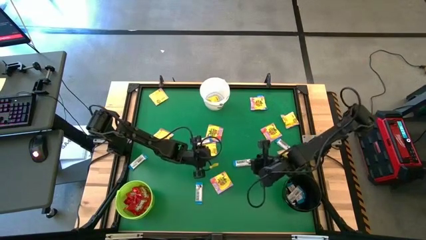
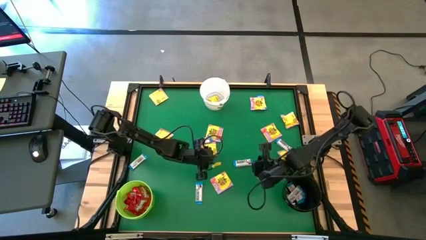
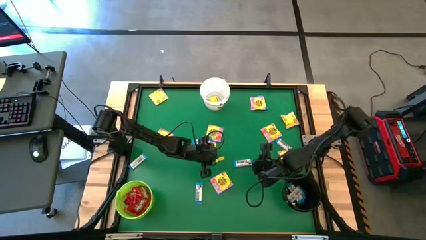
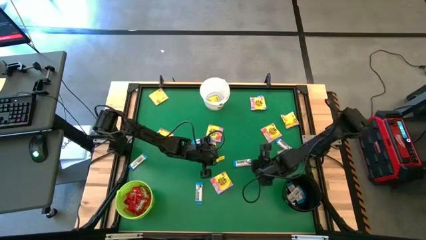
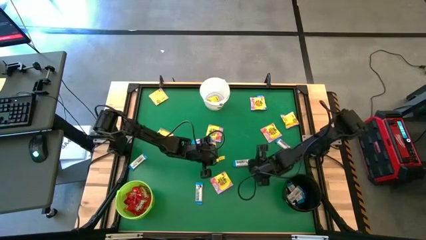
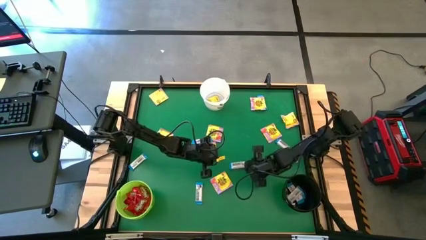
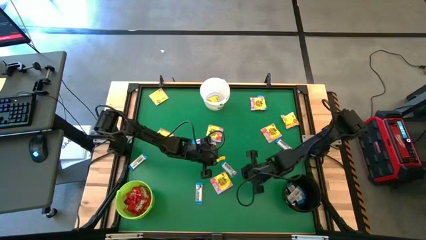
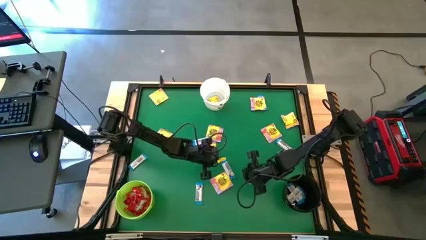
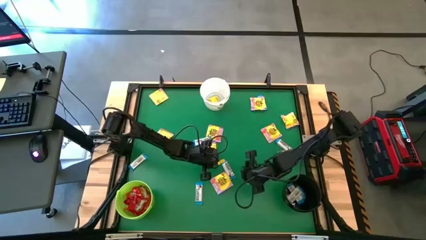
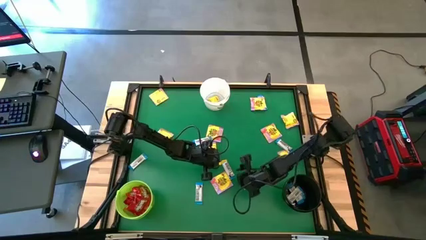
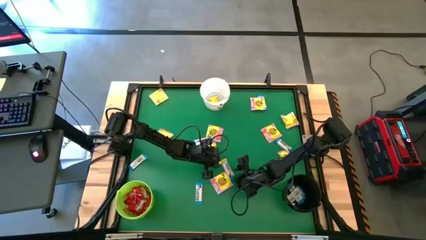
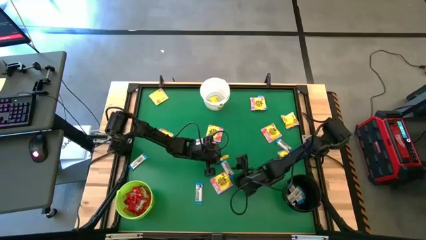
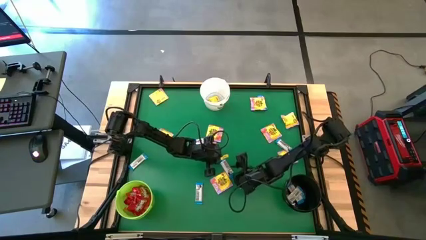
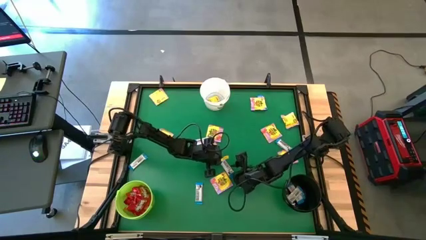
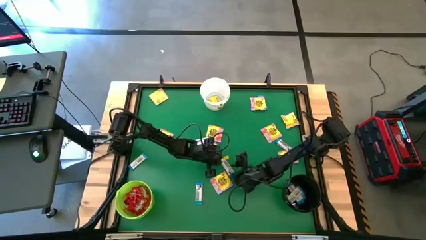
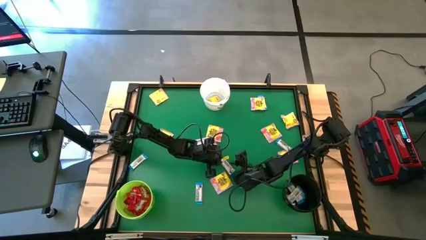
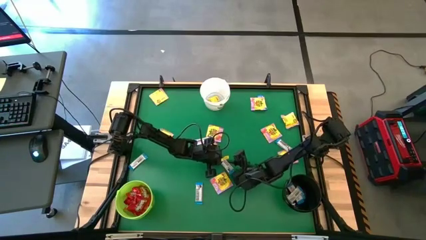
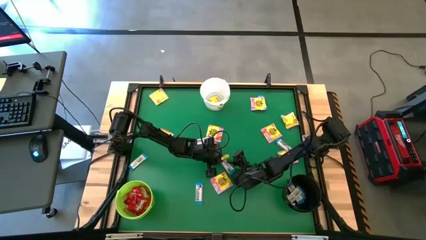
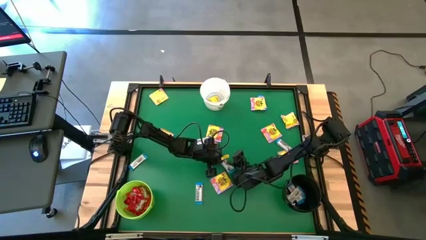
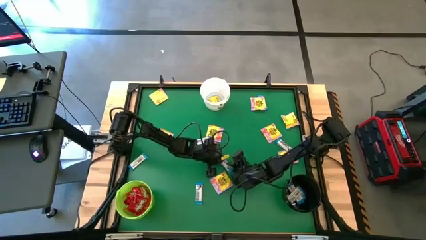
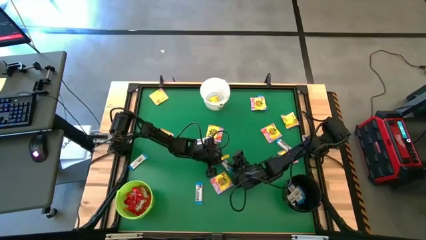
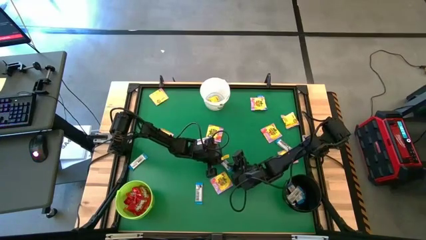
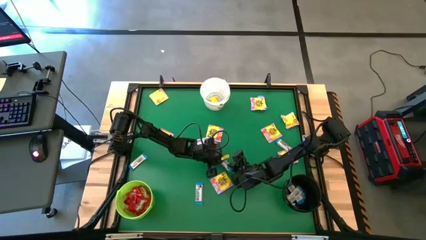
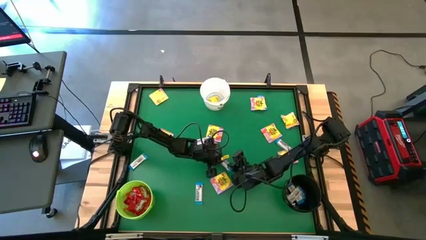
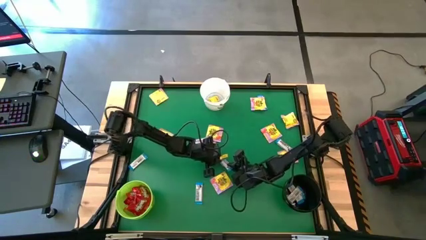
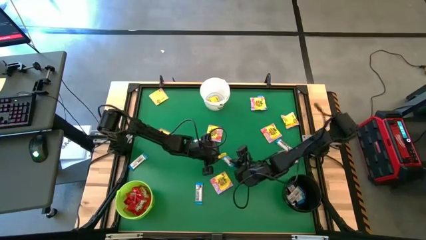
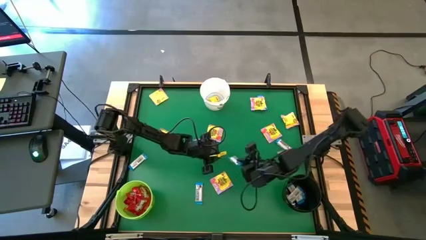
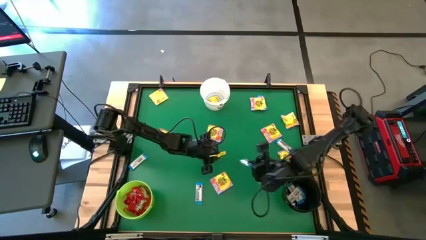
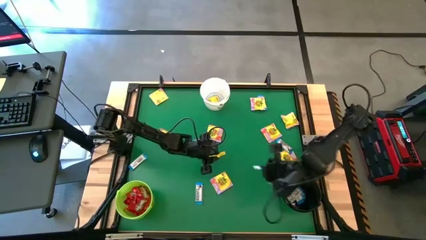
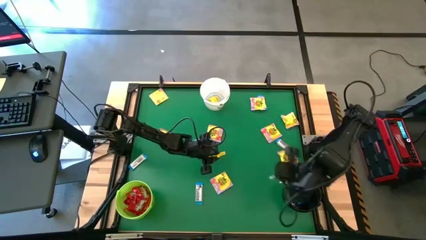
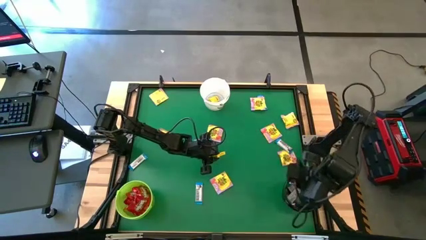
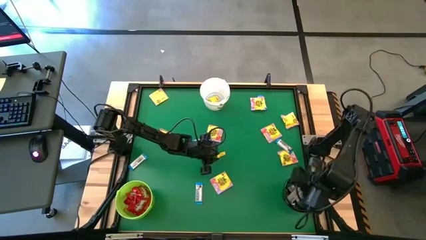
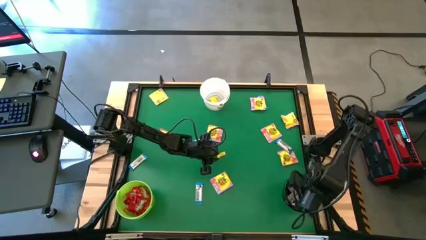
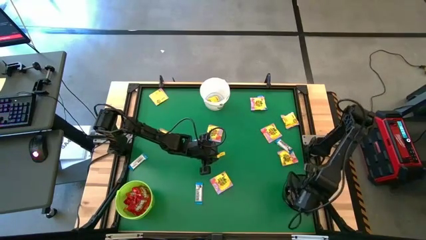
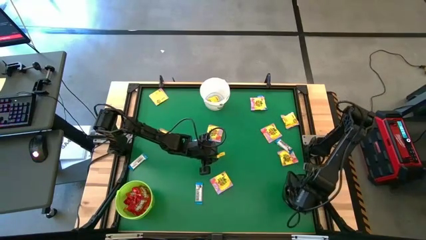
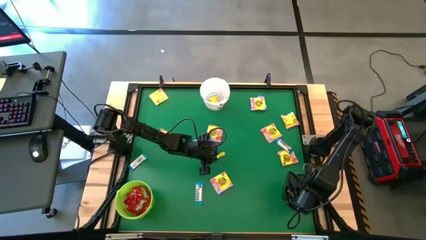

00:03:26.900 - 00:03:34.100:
Task: Sort candy by brand, put in halloween buckets
Put the white candy into the black bucket

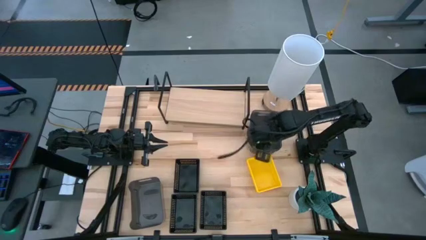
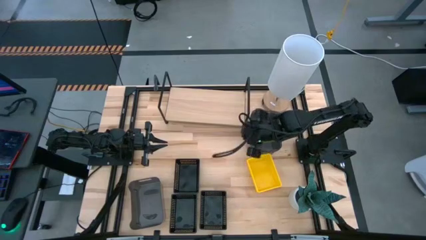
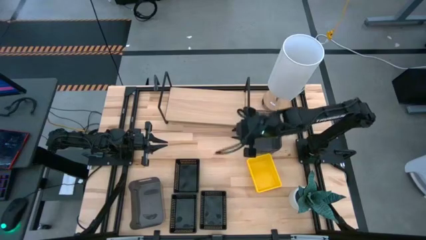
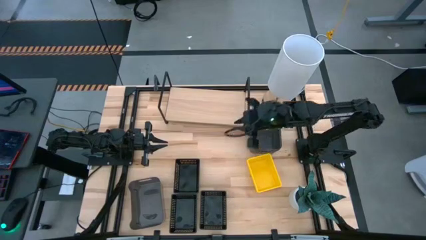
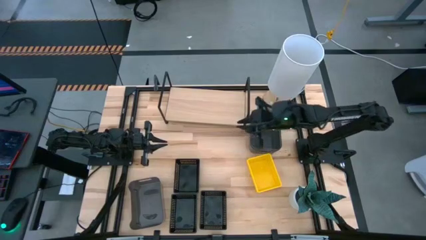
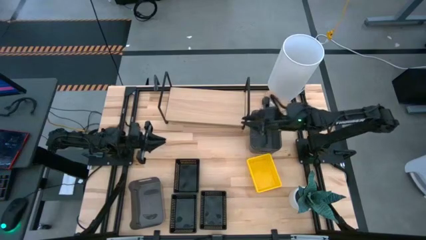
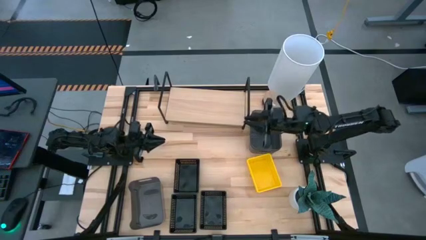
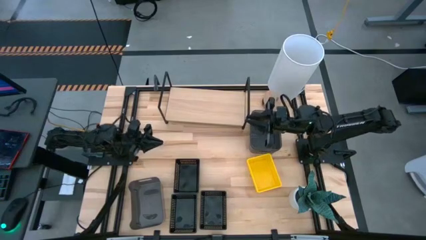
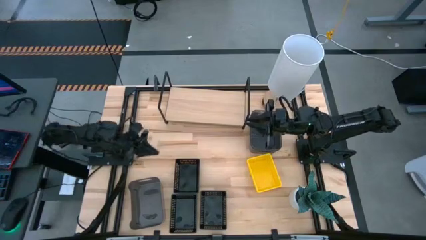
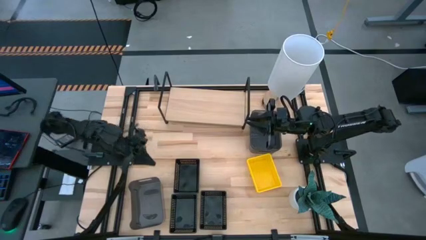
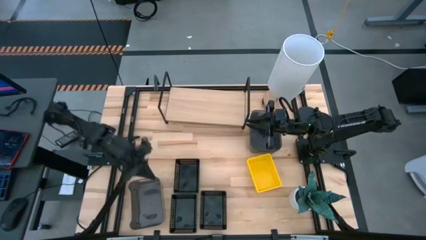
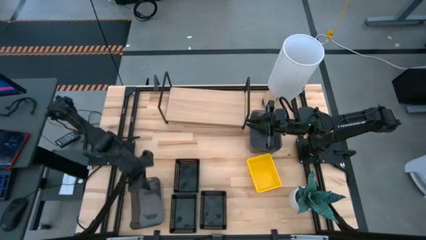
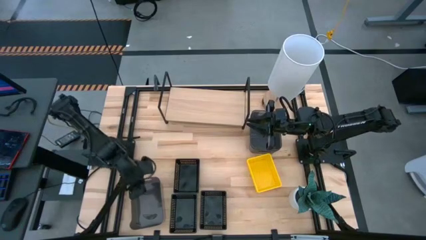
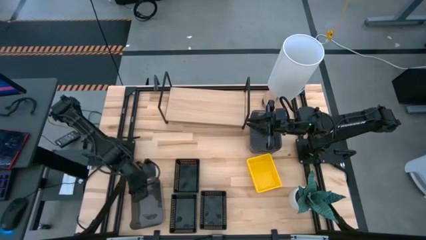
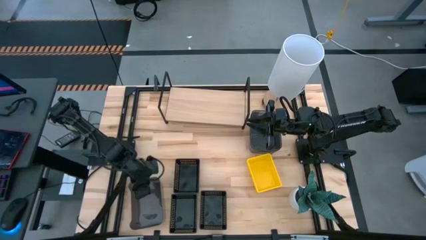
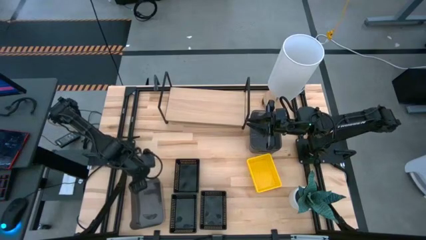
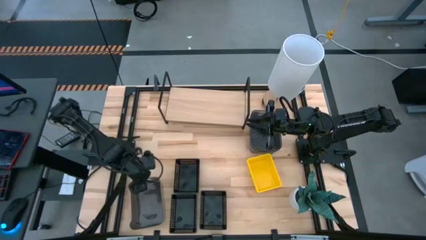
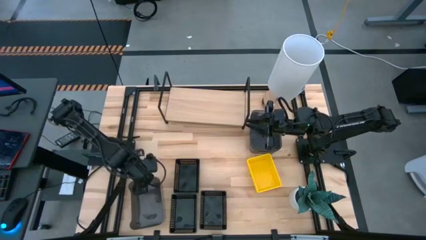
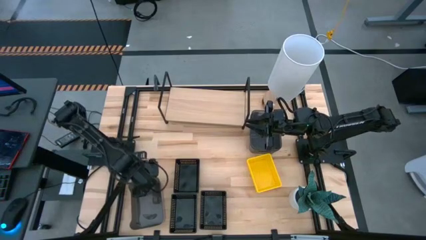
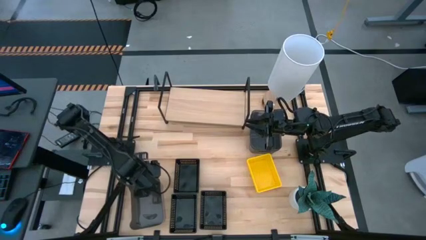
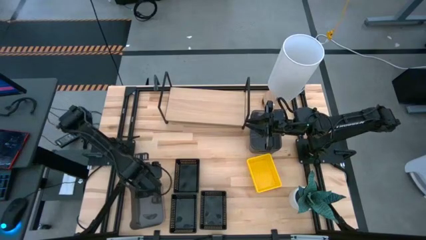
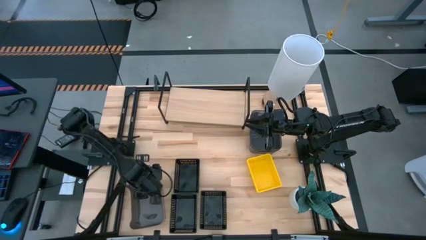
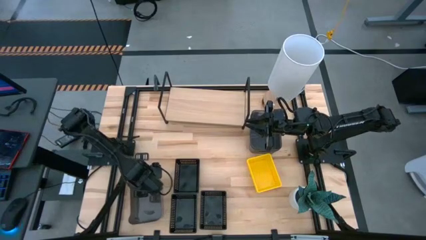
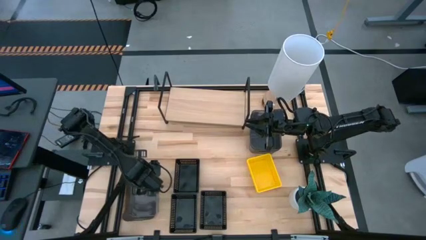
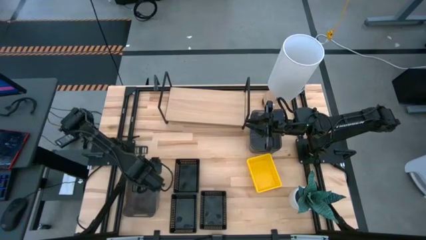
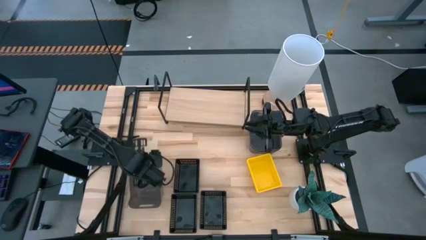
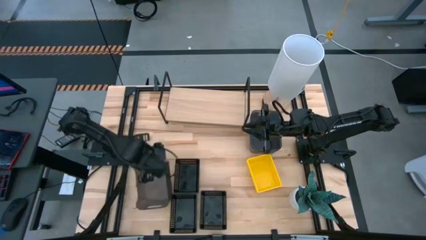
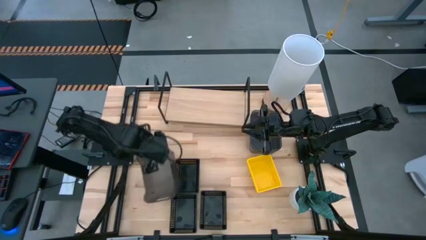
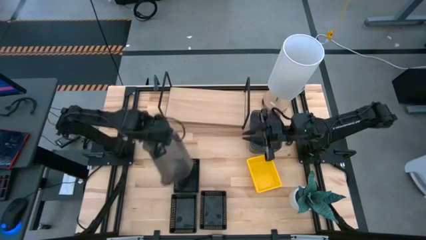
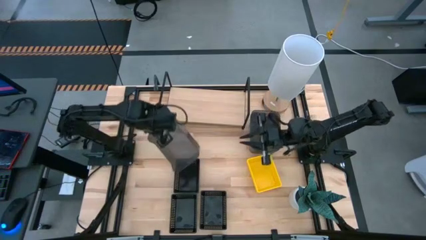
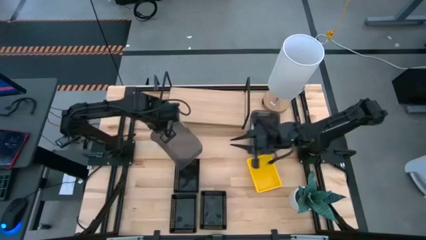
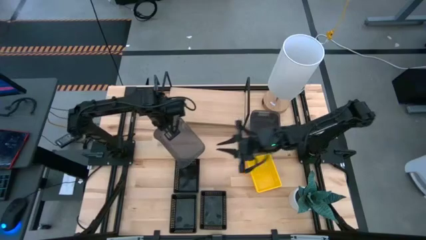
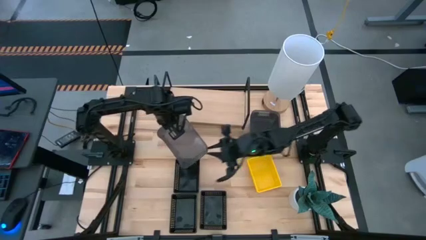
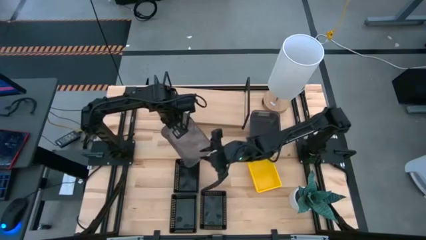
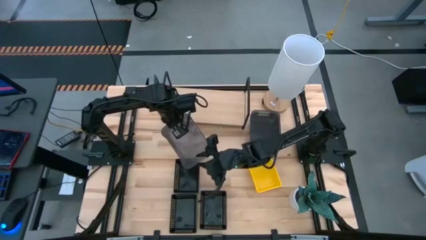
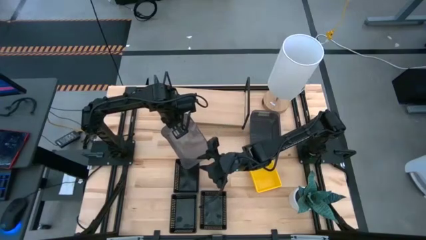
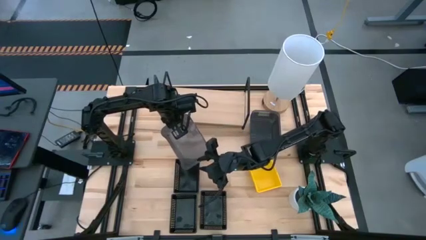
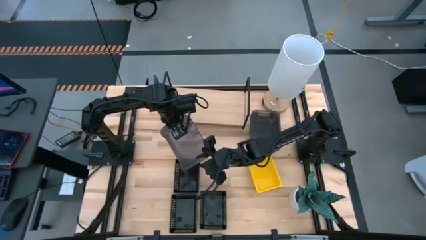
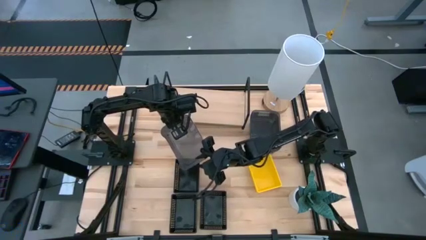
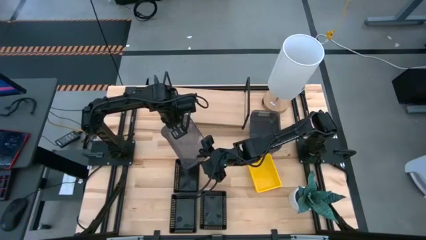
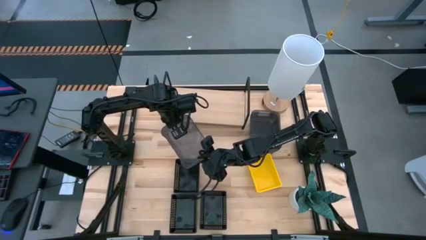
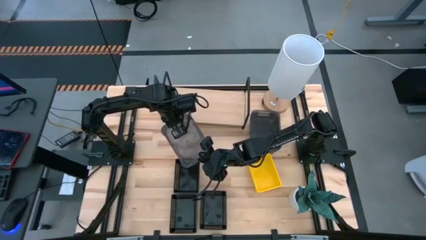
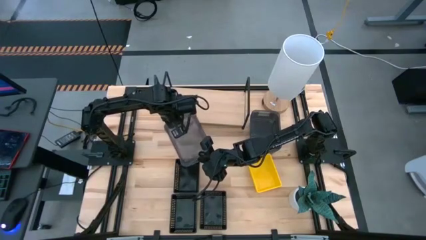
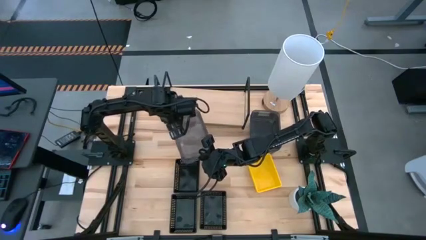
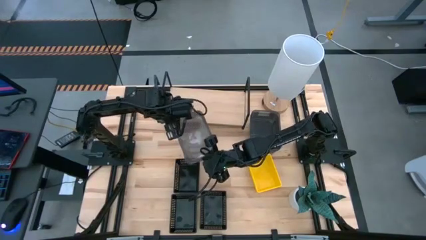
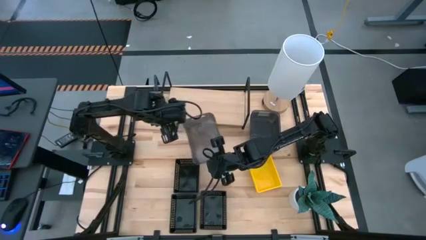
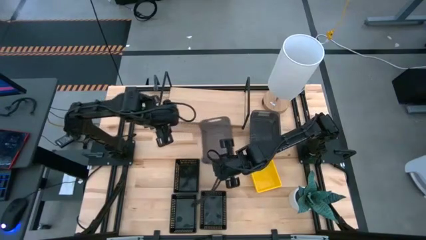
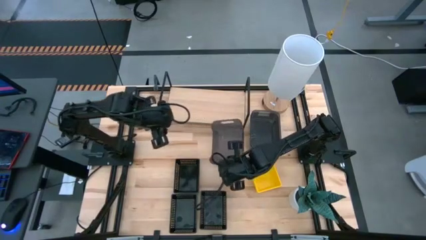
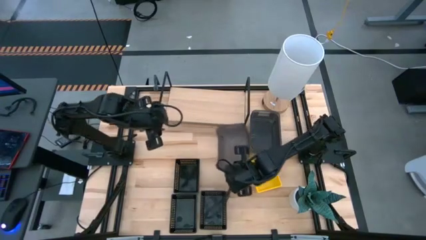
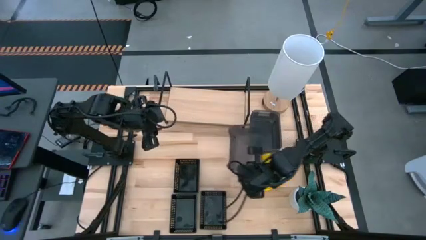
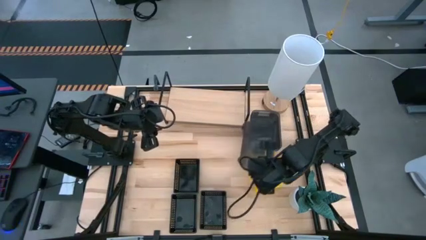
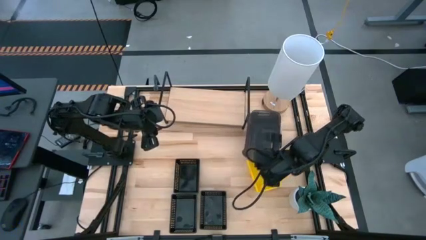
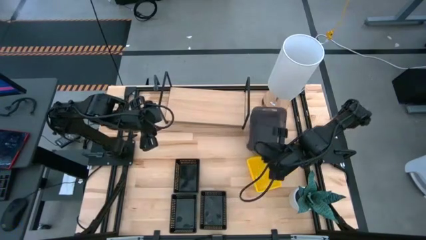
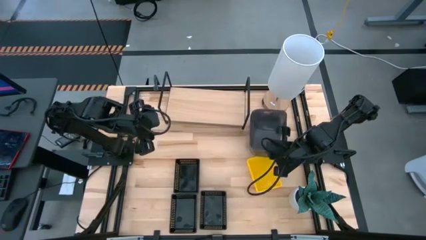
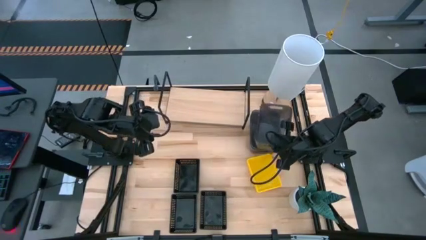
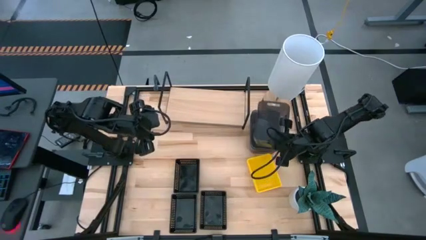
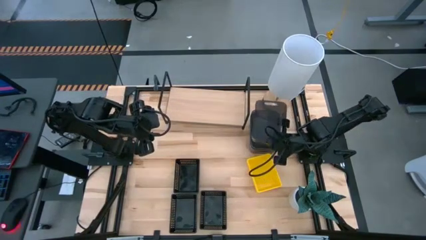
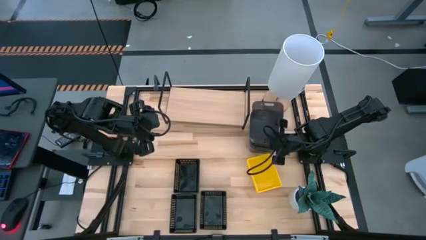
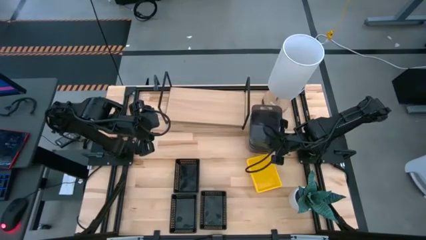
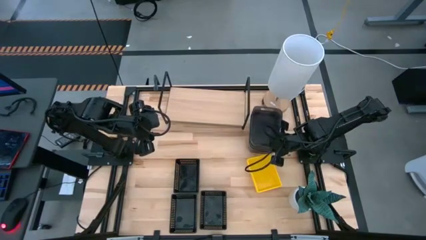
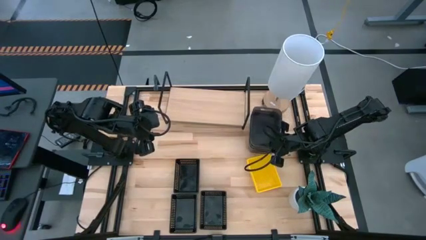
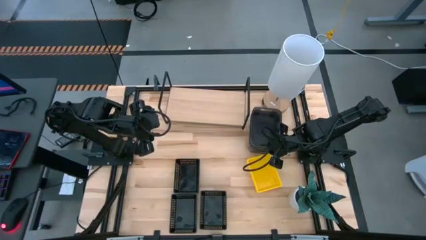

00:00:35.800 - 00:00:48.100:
Task: Stack baskets on shelf by color
Stack the bottom black transparent bin on top of the other stacked black transparent bins
